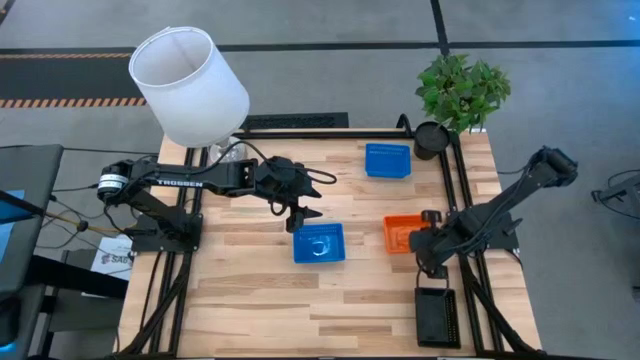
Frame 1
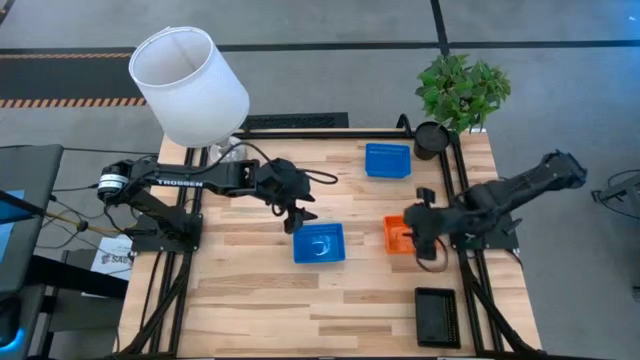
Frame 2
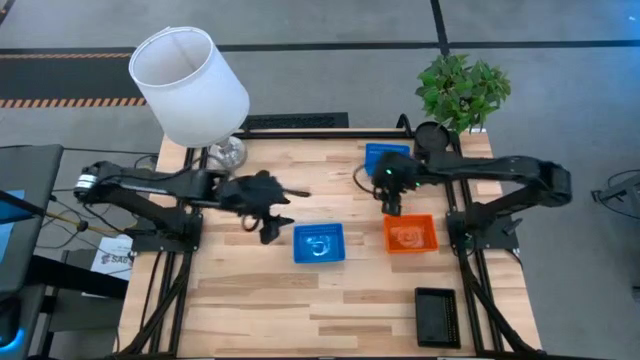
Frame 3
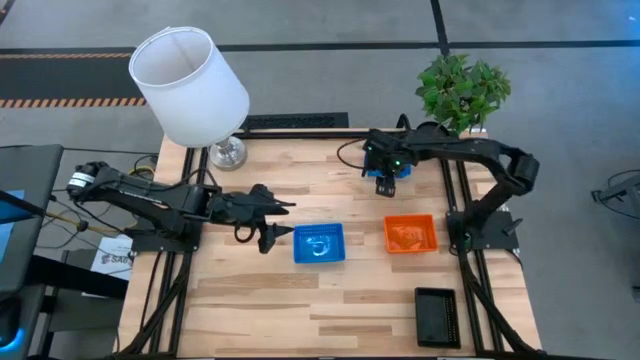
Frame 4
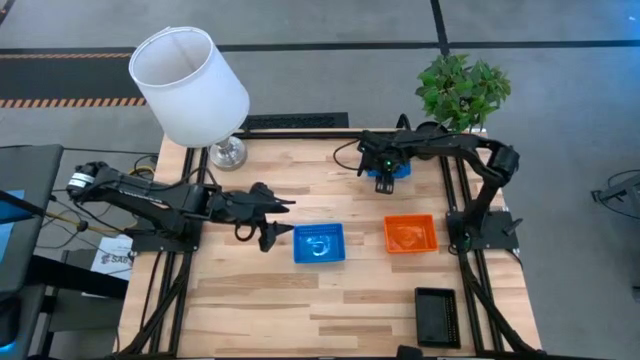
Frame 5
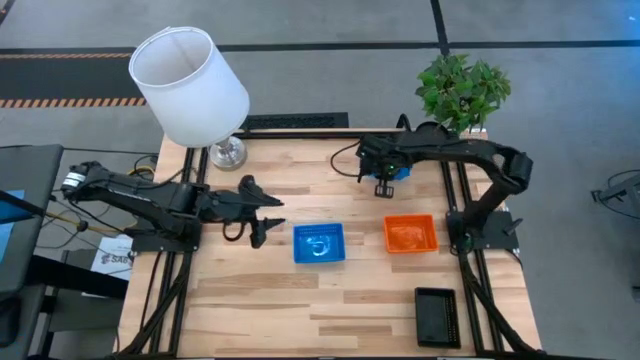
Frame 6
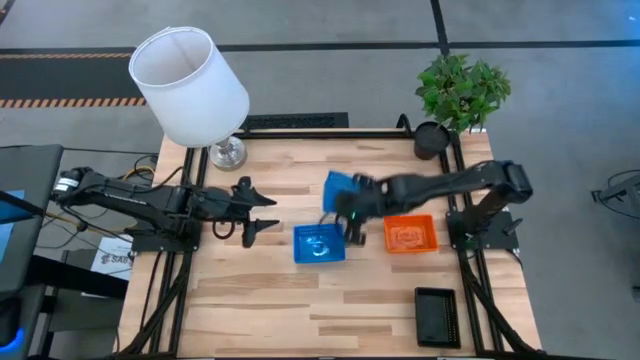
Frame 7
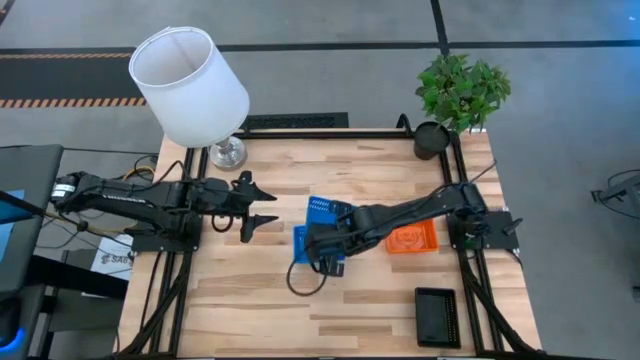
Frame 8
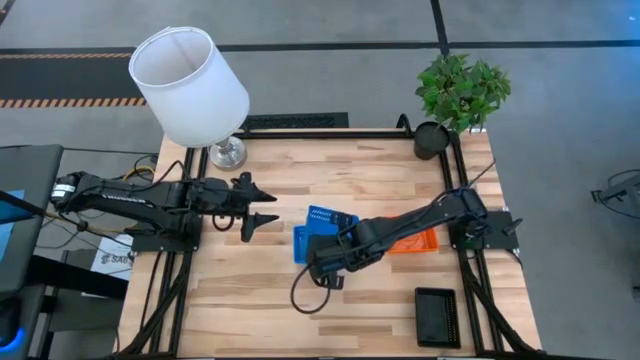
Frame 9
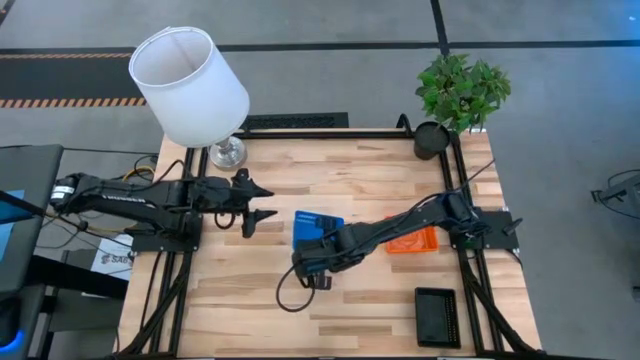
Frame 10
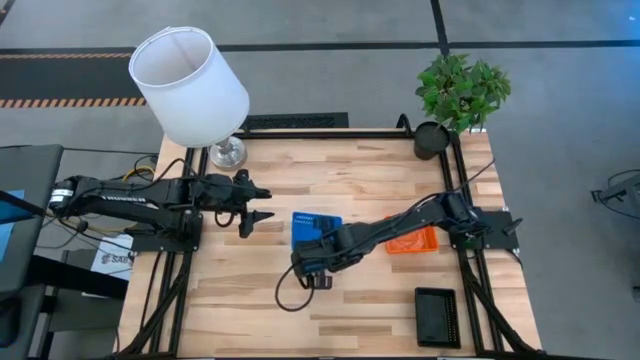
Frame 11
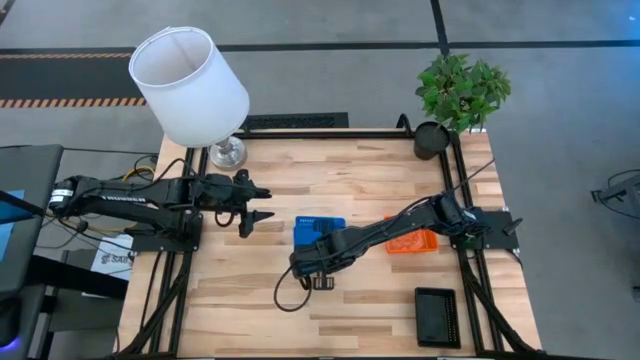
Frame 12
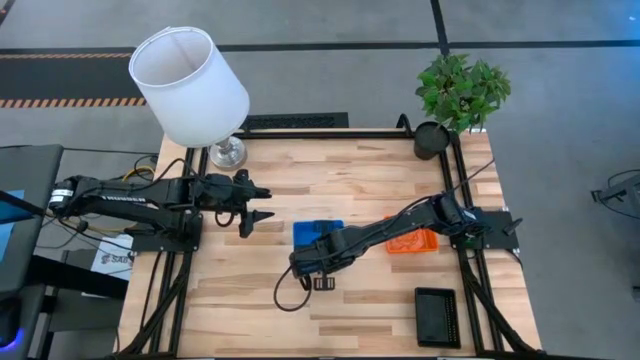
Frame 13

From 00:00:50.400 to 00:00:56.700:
Stack the top blue bin on top of the bottom blue bin

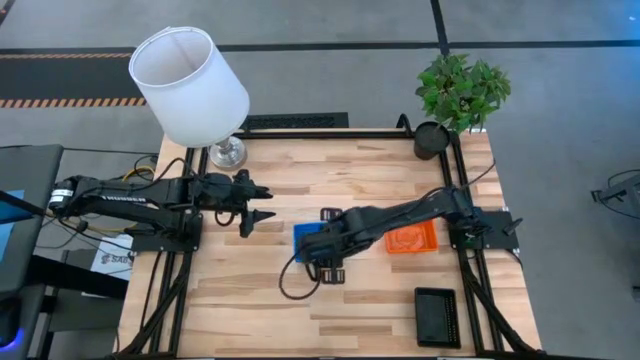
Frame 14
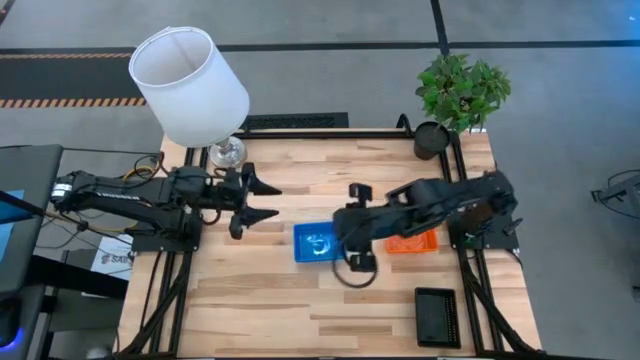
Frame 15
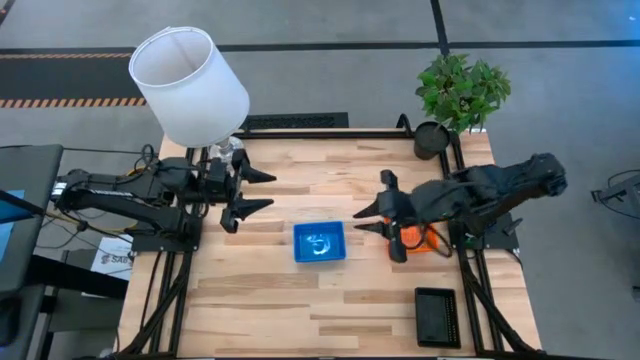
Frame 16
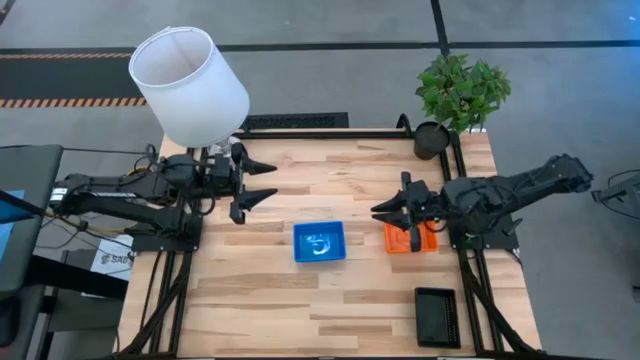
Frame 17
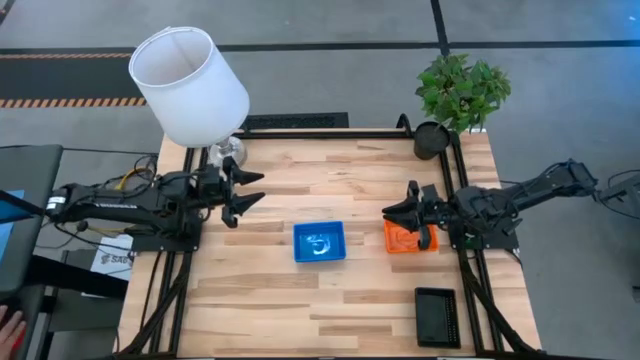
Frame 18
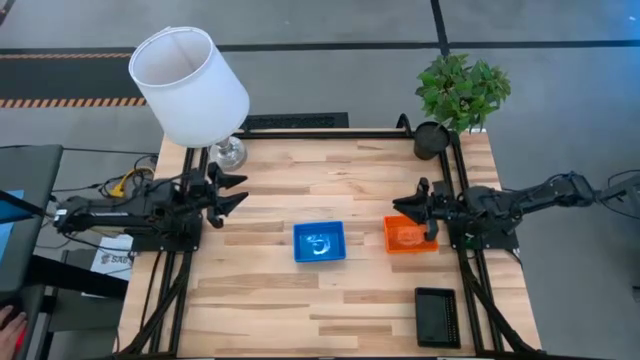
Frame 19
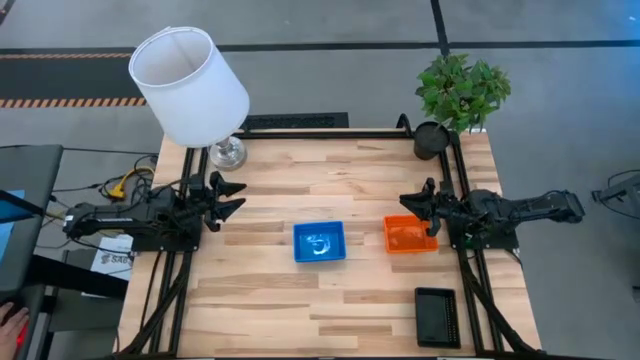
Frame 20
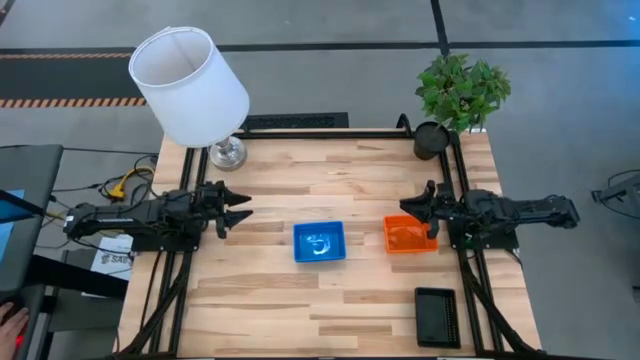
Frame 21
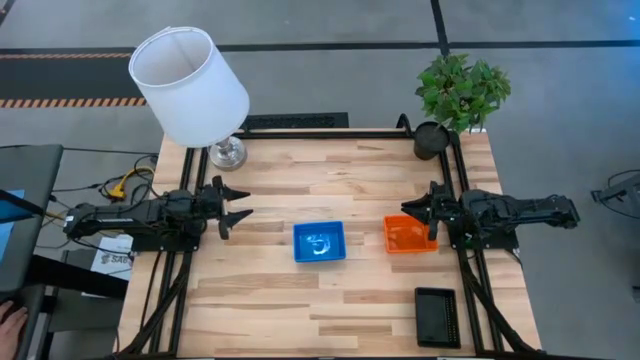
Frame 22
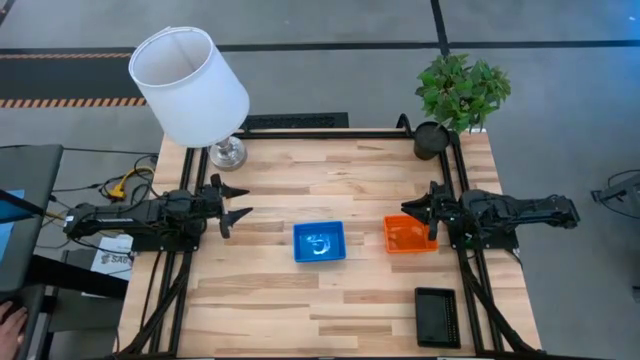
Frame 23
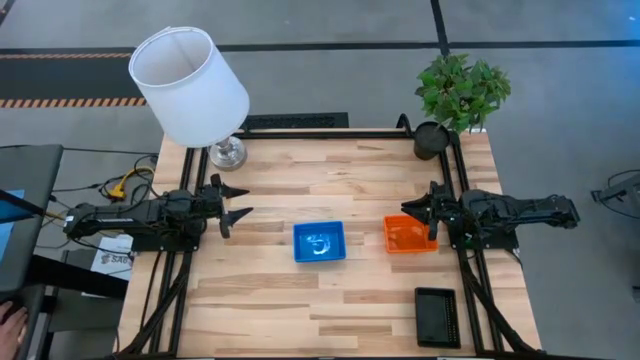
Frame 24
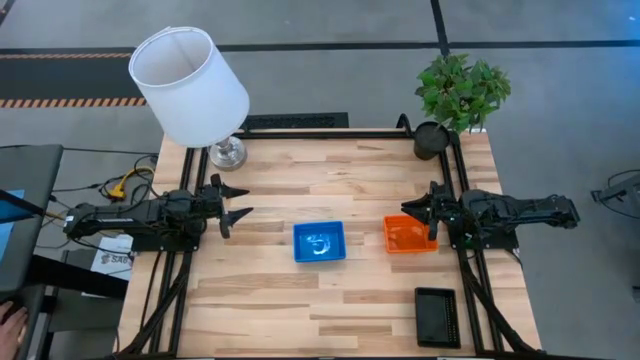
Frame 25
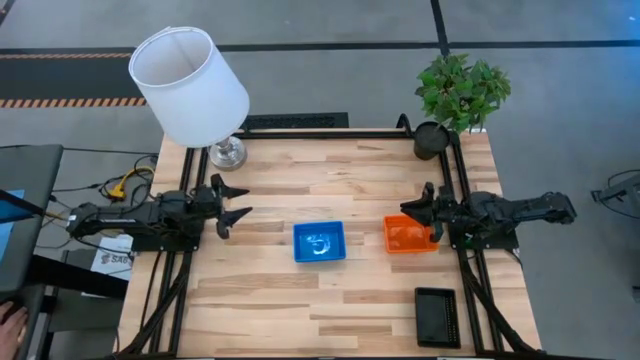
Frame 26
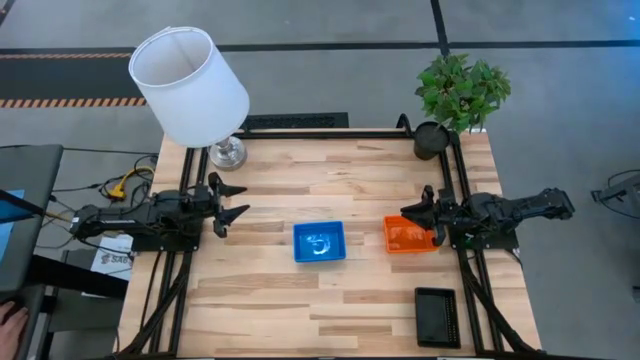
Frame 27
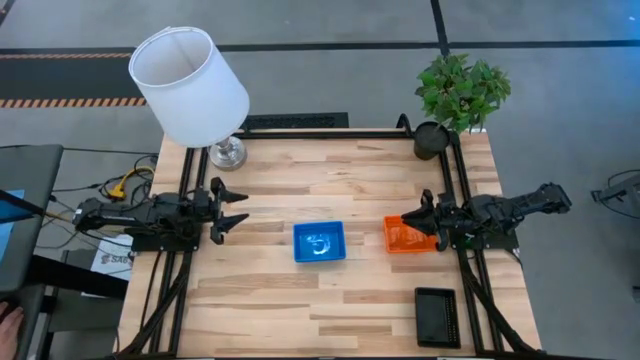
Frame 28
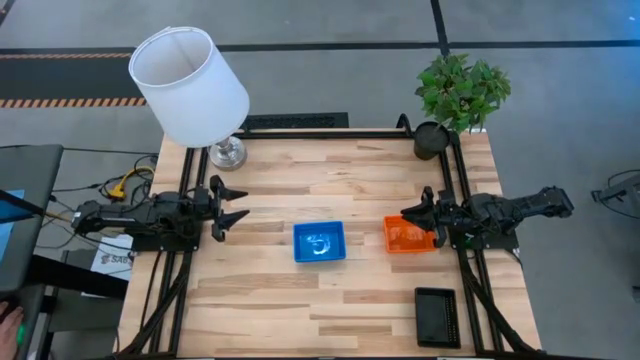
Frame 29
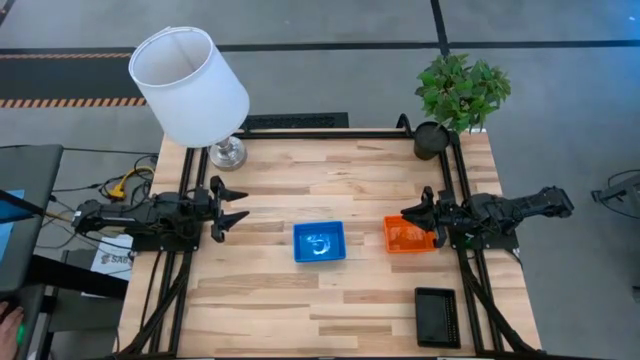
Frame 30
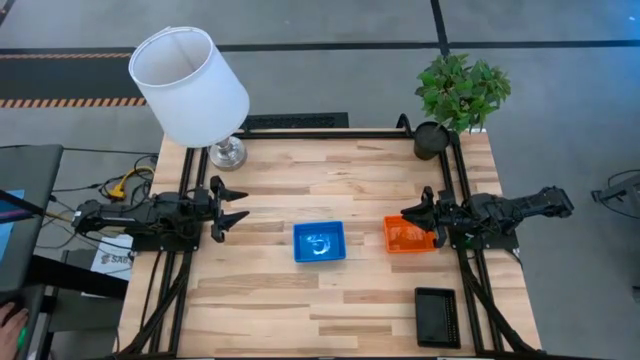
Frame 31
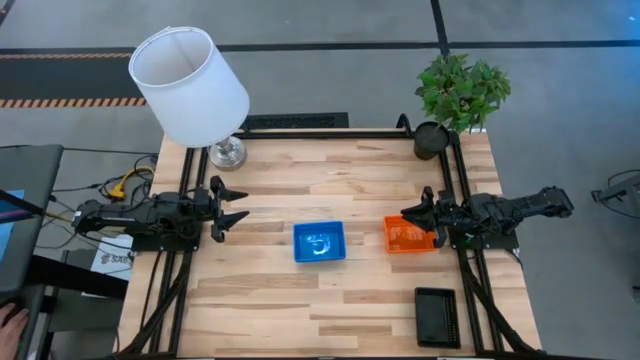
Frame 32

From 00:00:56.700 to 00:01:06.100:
Return to Home Position
